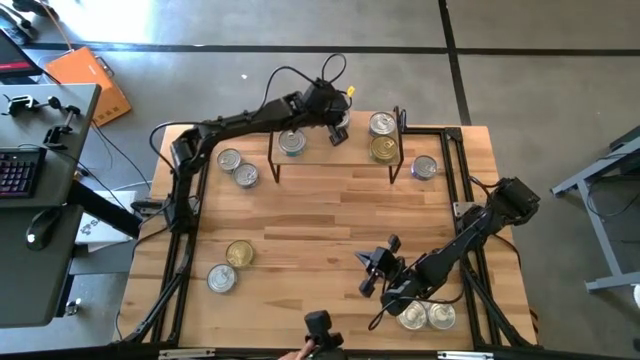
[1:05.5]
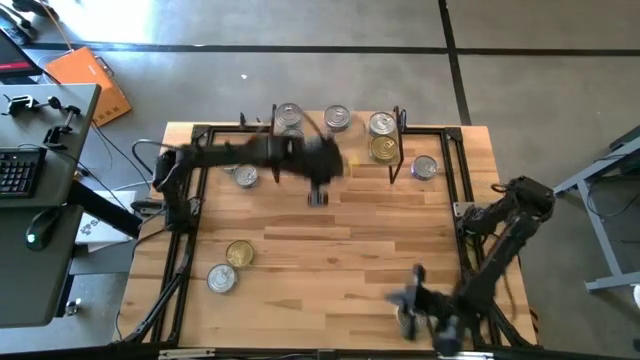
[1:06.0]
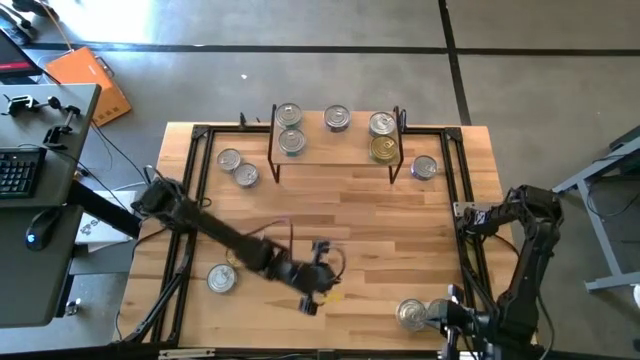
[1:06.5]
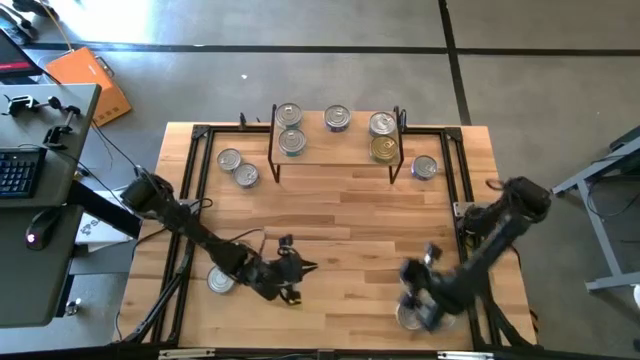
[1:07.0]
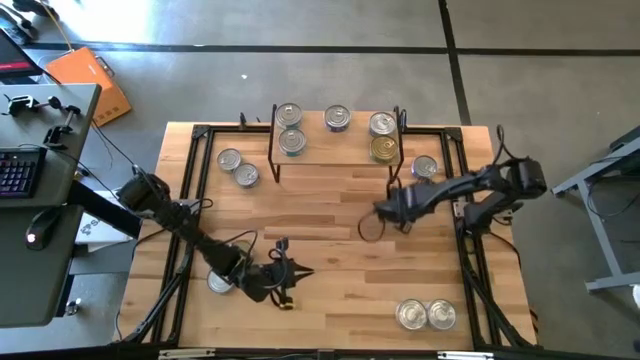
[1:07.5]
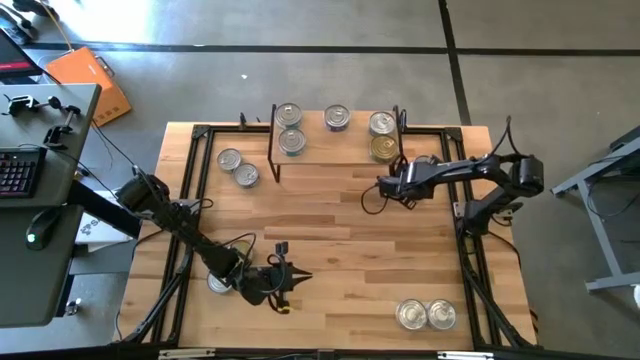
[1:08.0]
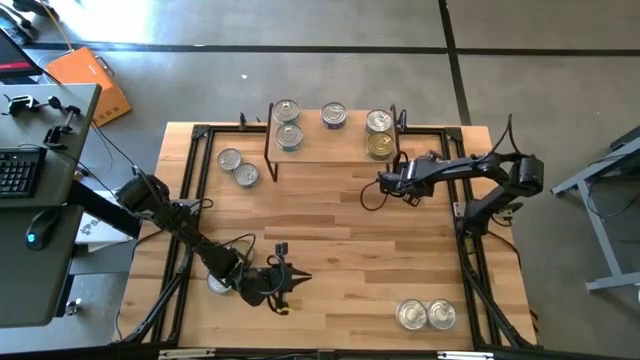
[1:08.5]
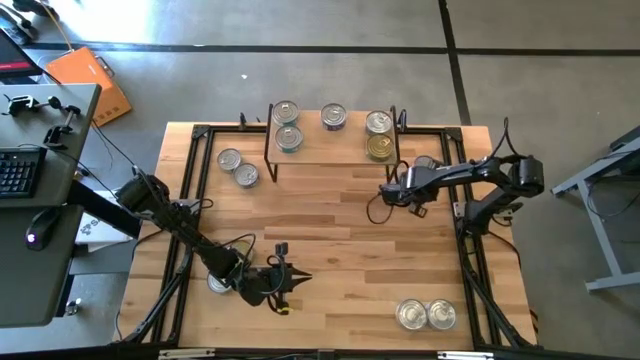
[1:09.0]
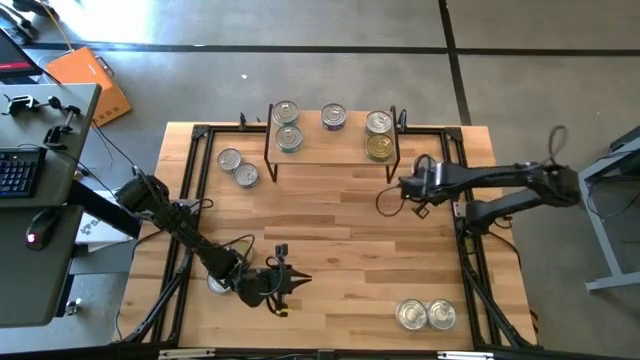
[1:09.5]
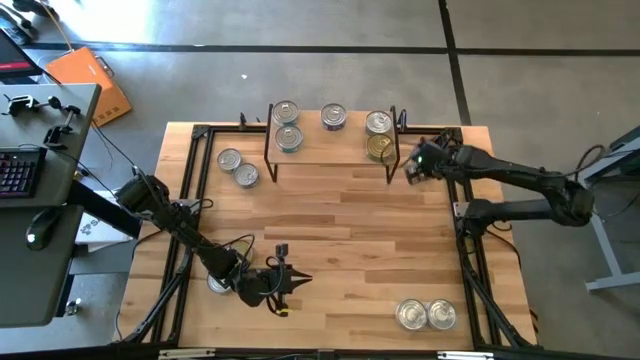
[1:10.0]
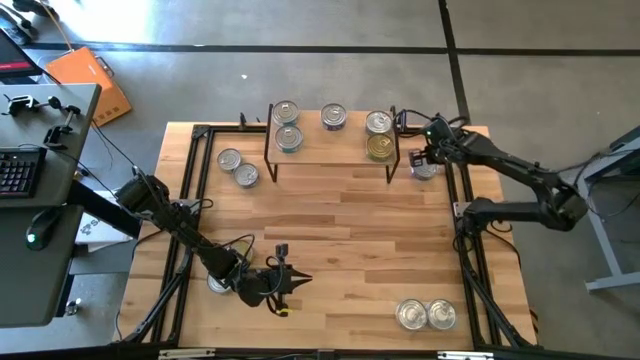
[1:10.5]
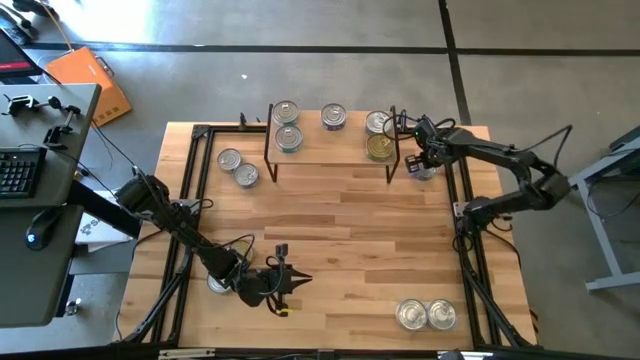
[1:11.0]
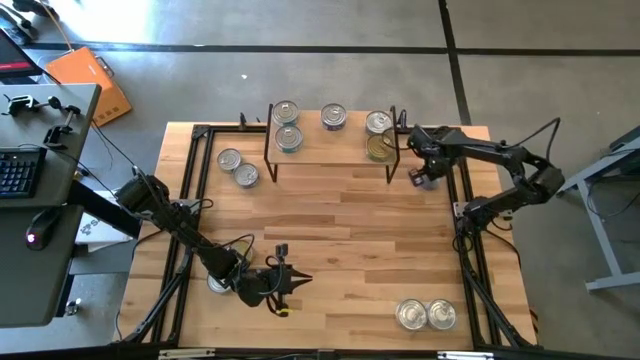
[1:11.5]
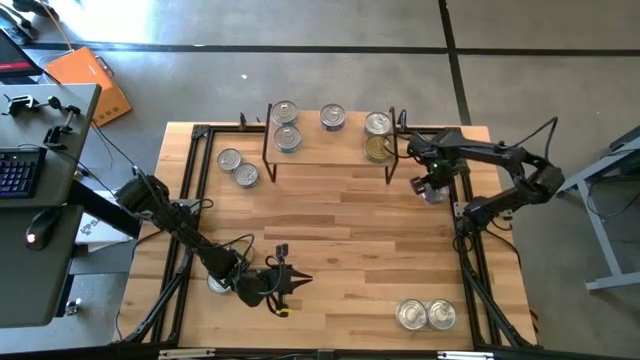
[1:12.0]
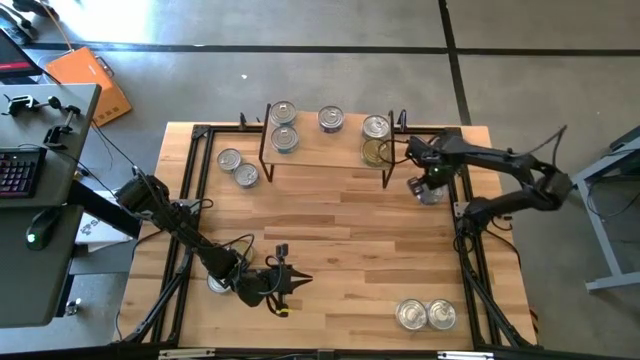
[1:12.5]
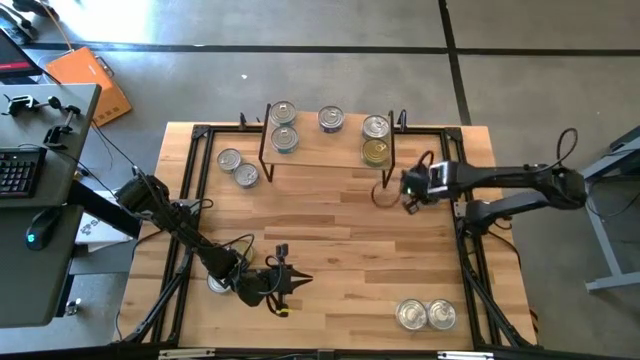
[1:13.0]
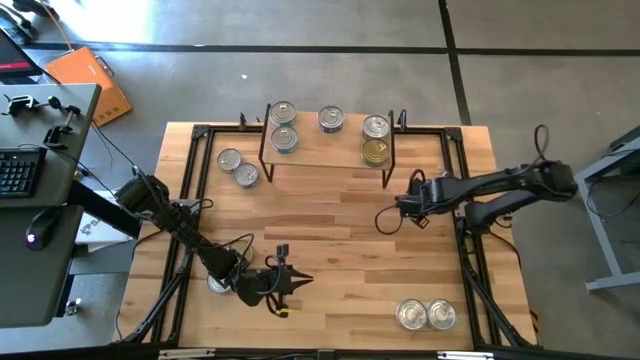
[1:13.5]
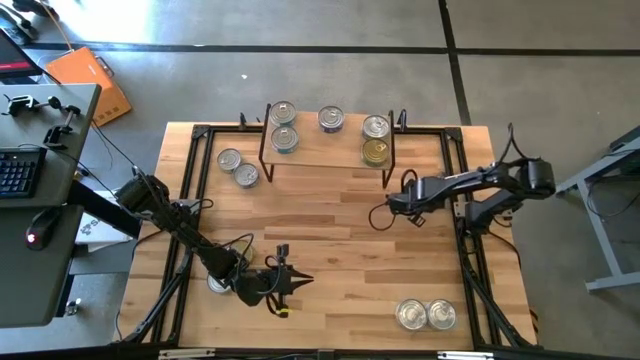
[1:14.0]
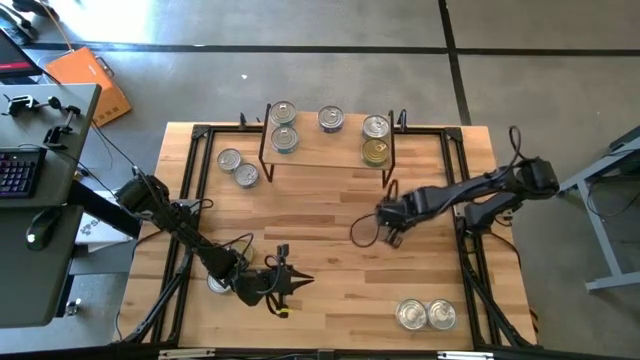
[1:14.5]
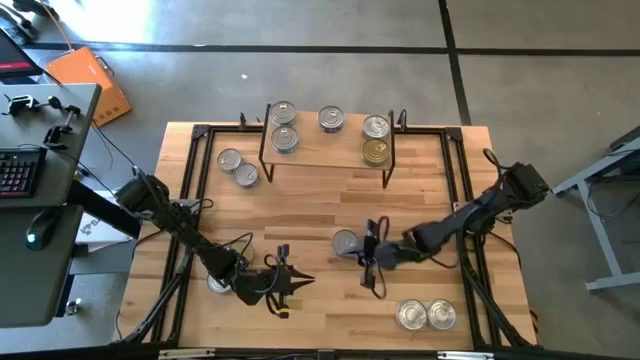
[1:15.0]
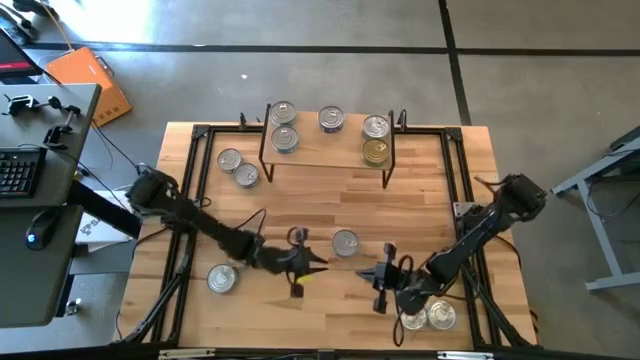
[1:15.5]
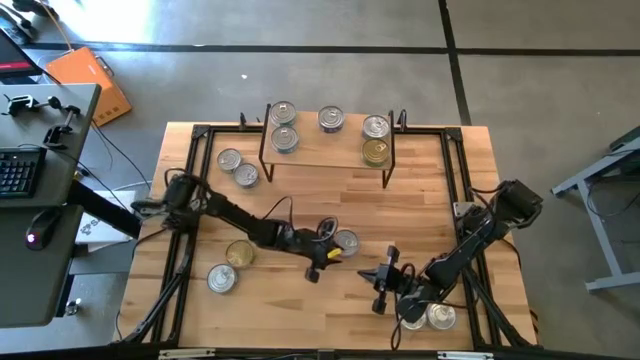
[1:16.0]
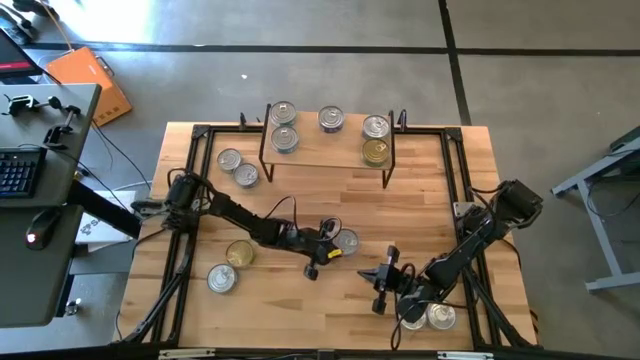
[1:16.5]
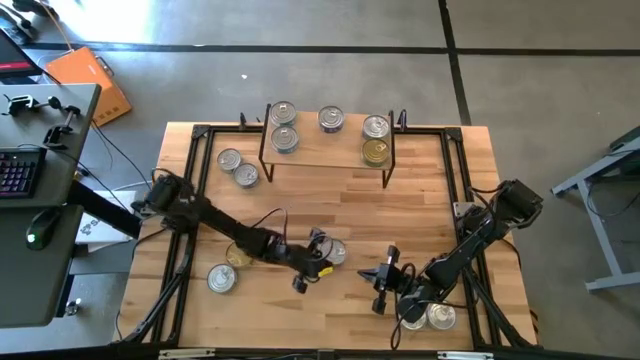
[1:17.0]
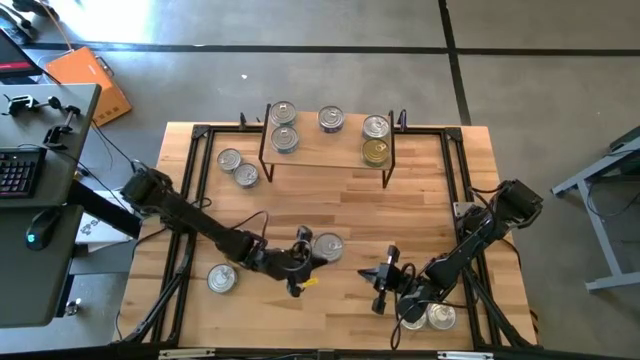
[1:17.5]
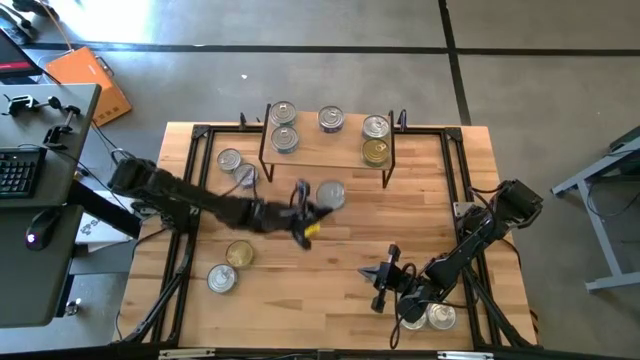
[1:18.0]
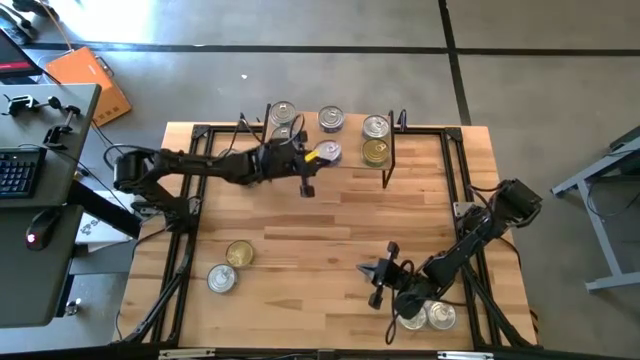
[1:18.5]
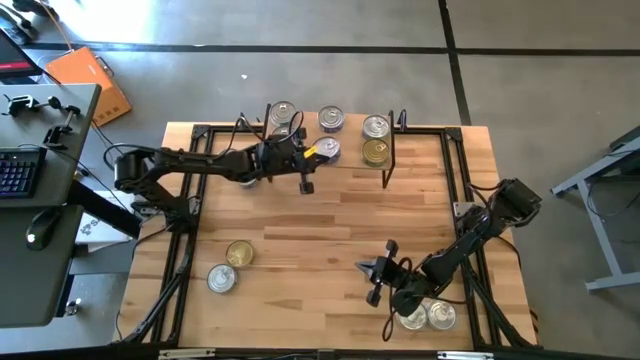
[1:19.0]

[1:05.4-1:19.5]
Task: Stack canned seafood by type on shelf
Put the blue tuna can aligned with the other blue tuna can on the shelf

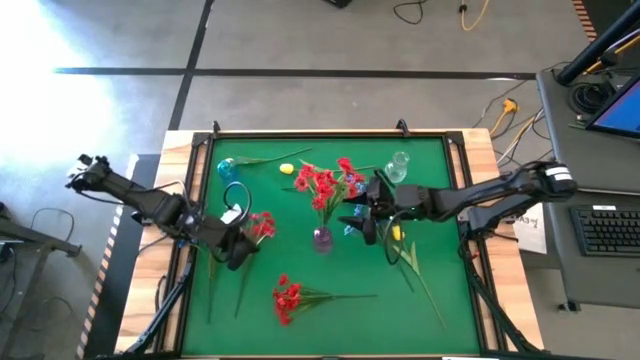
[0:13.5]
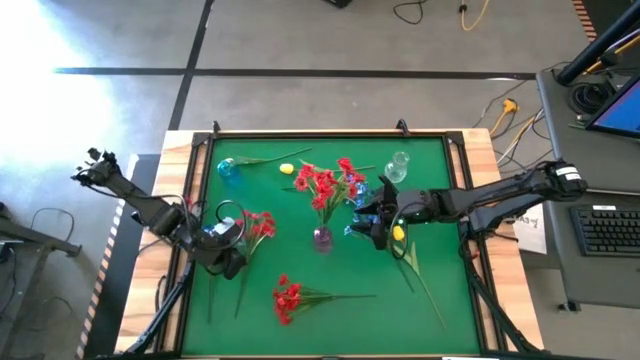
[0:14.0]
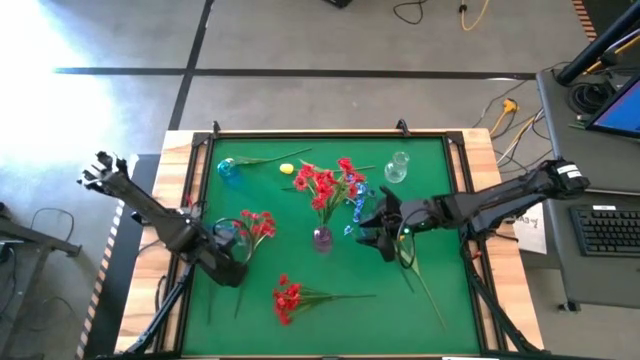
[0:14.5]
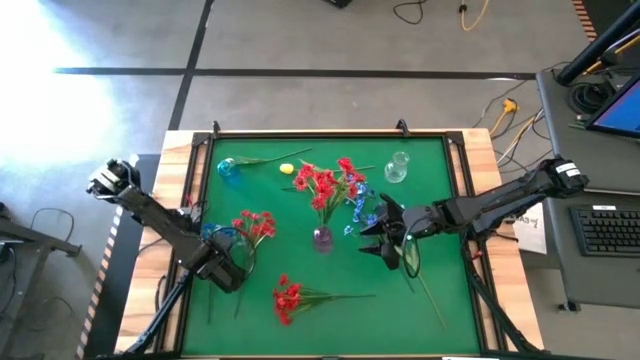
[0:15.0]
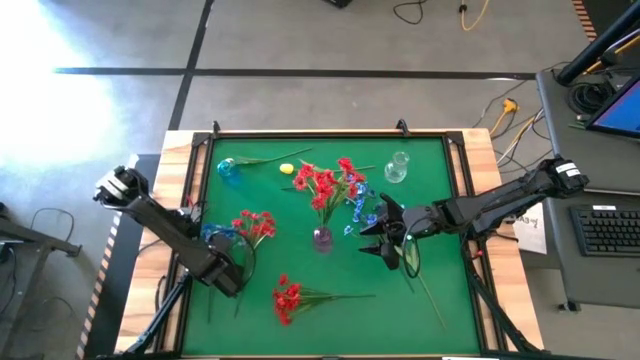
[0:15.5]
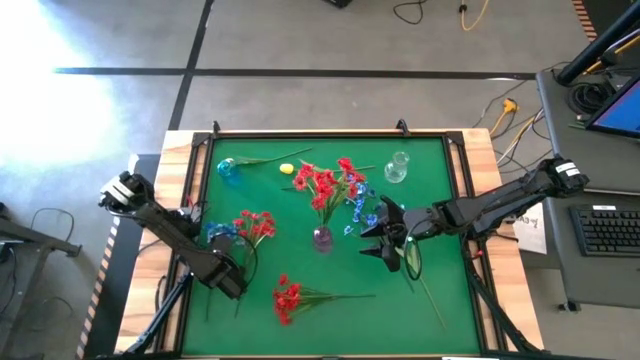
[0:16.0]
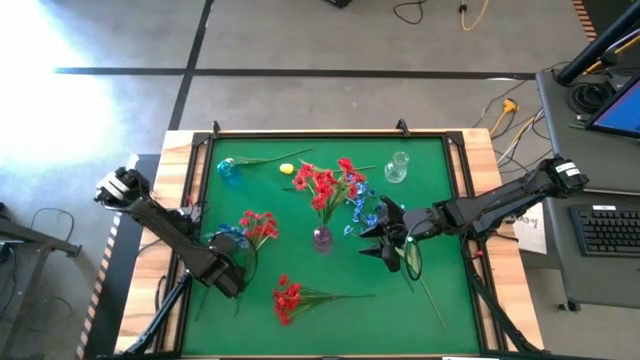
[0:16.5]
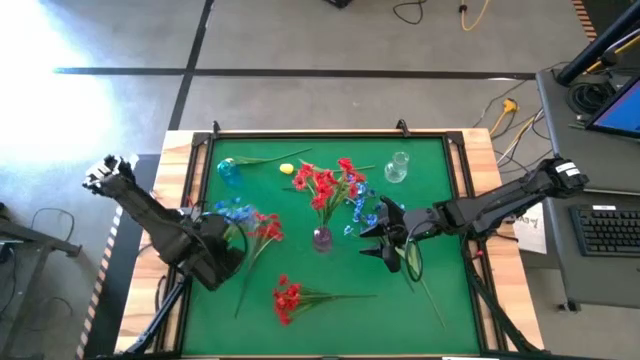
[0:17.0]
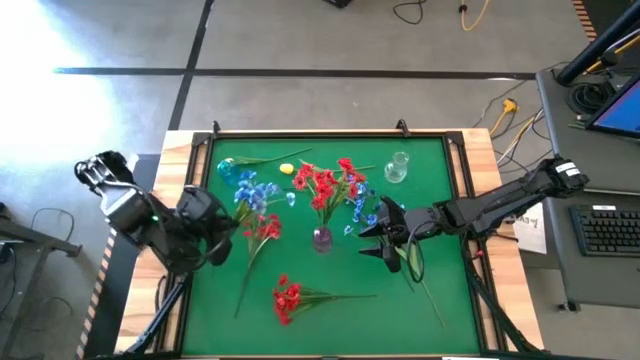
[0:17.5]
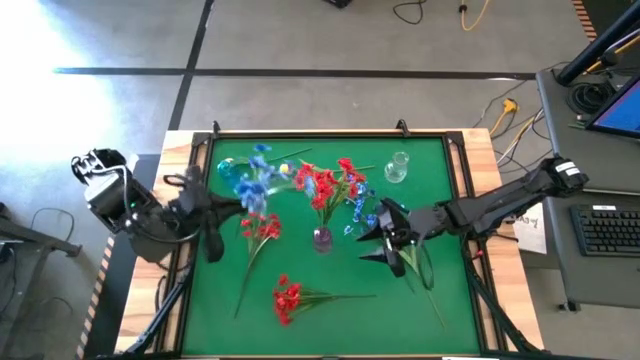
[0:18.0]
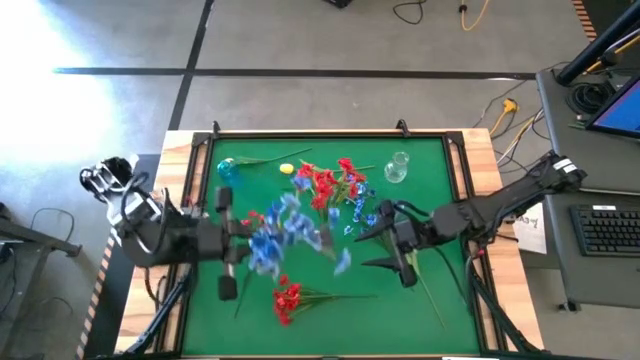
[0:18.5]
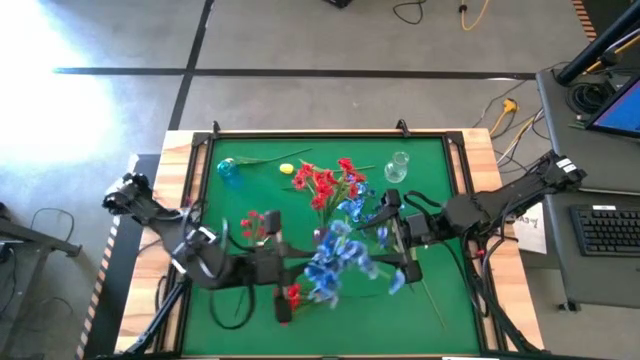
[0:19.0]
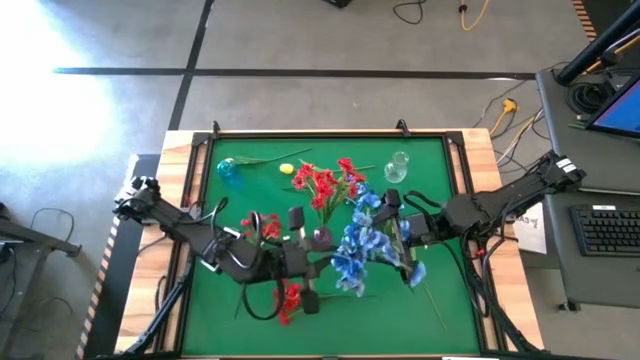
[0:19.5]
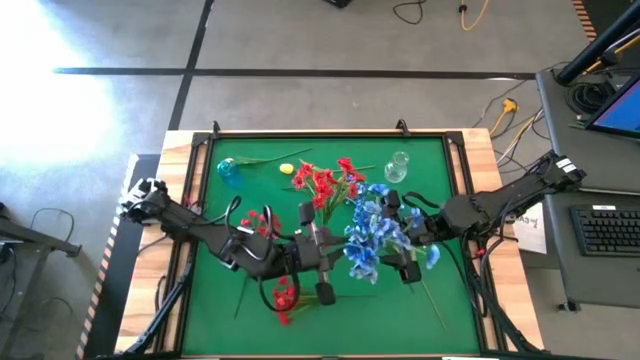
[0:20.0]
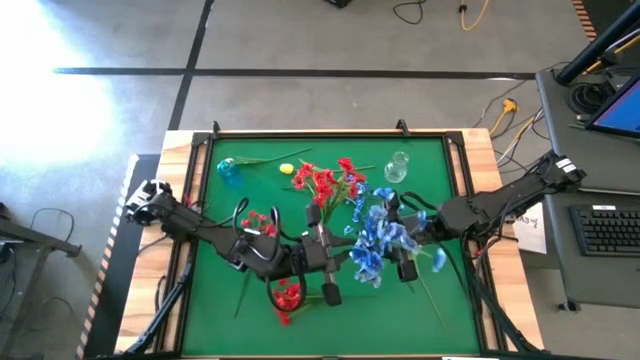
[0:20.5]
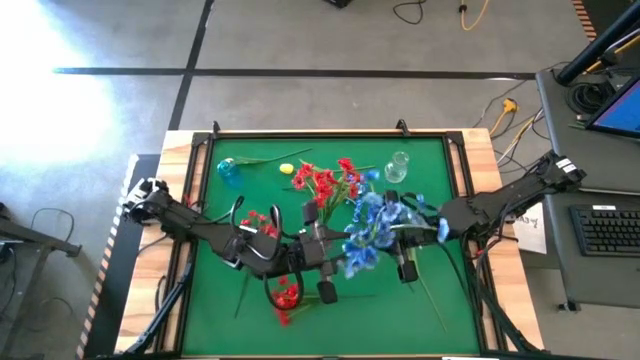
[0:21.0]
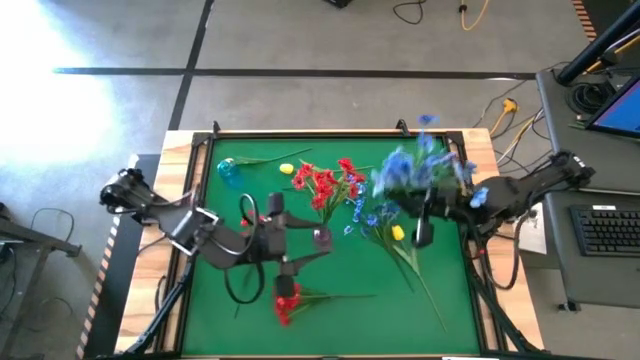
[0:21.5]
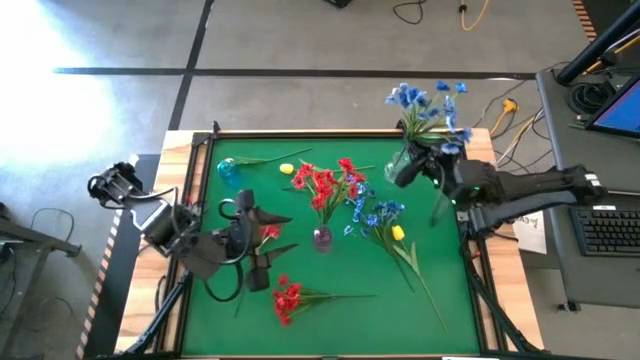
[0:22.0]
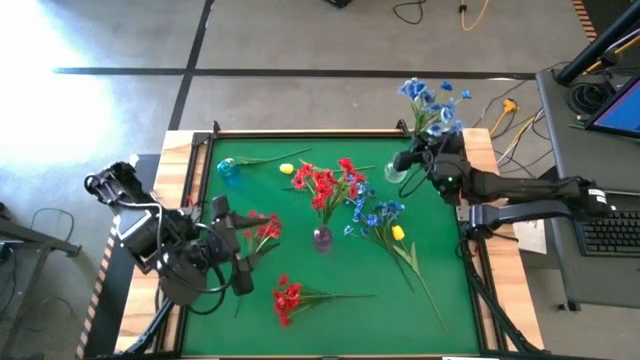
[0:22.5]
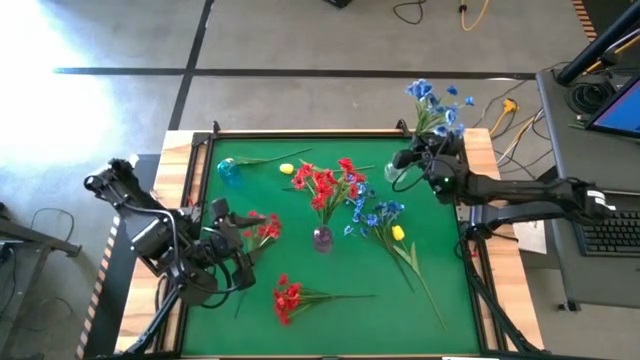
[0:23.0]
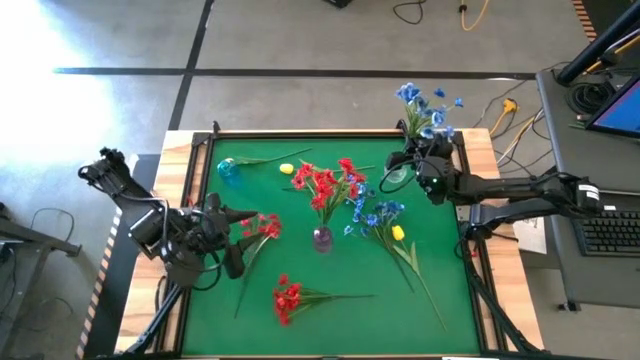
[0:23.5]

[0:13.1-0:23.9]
Task: Sort flowers into vase by color
Put the bottom left blue flowers into the transparent vase
